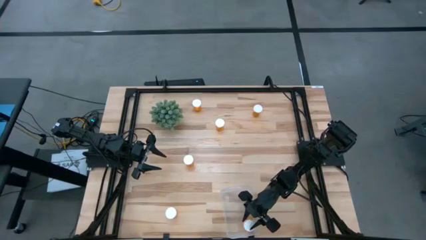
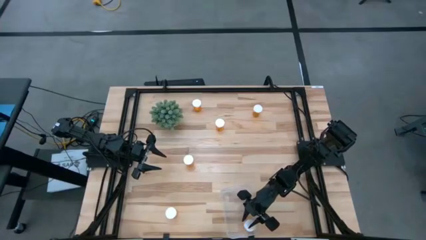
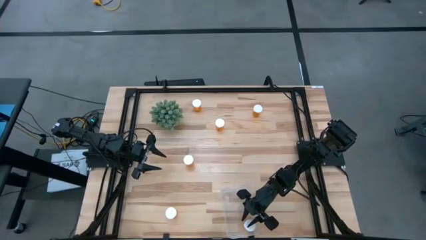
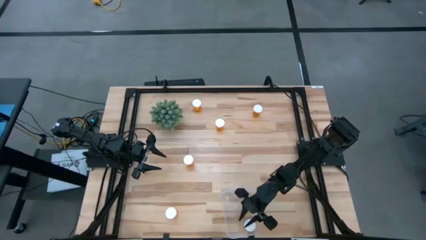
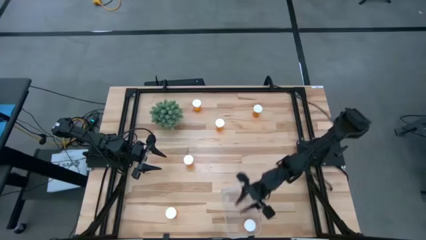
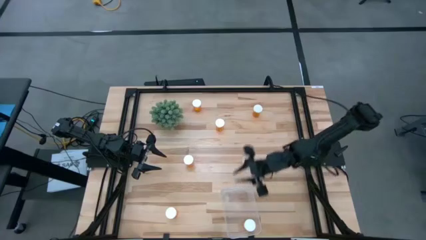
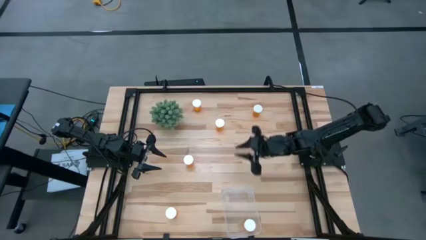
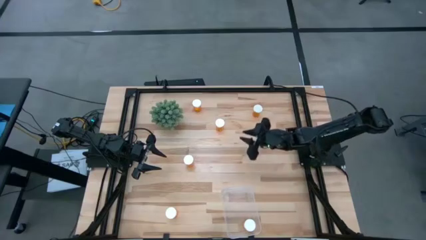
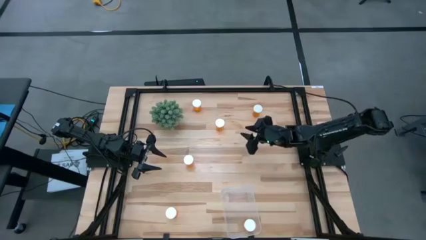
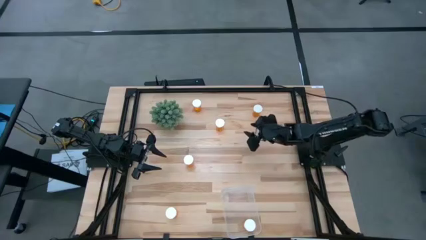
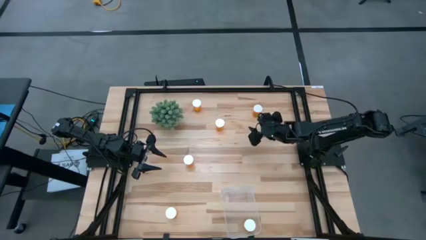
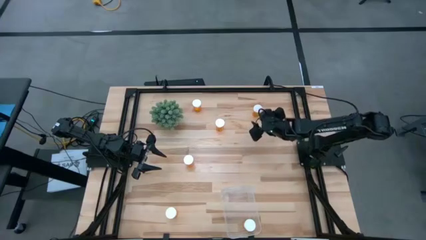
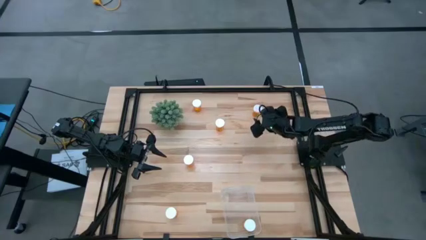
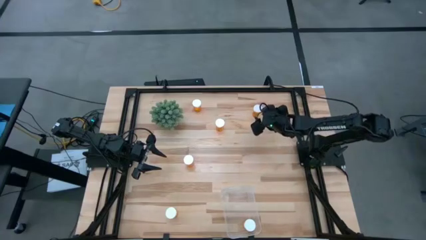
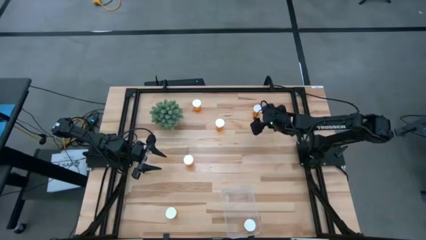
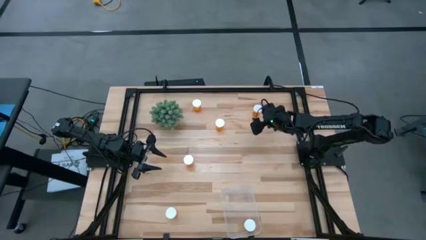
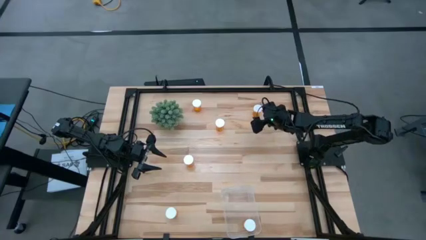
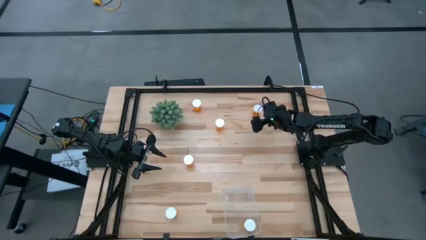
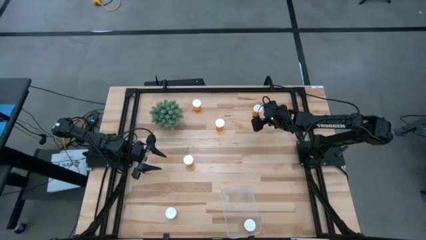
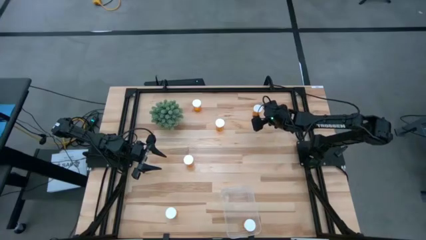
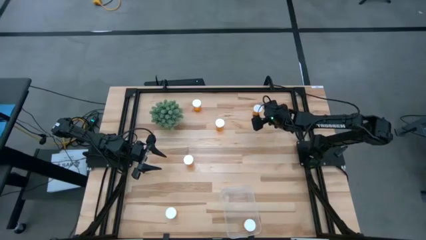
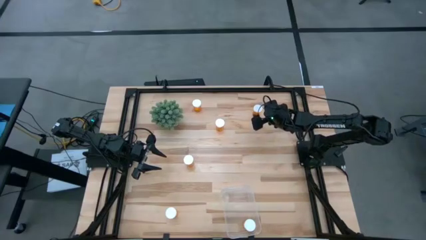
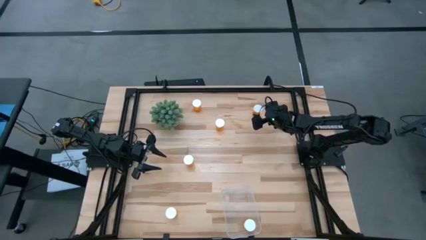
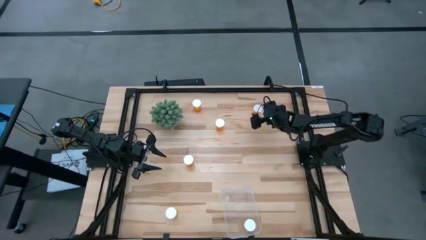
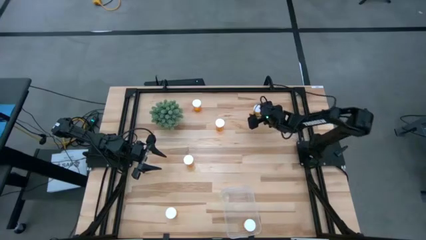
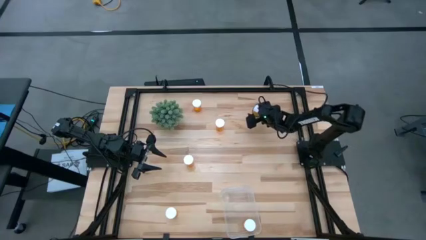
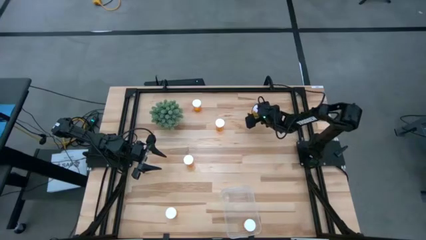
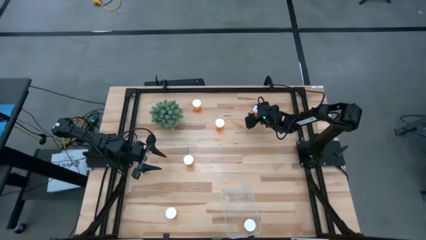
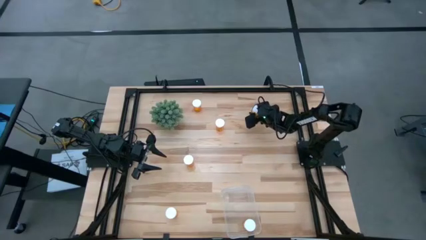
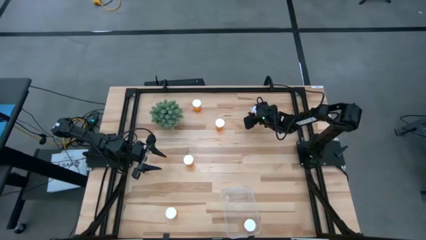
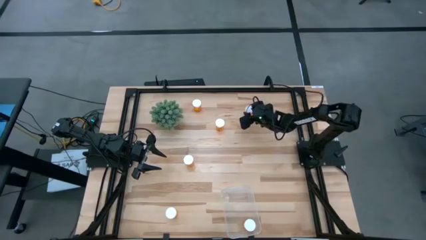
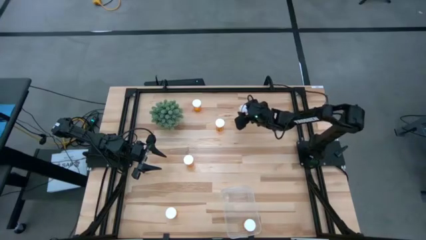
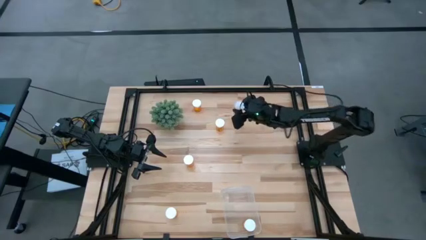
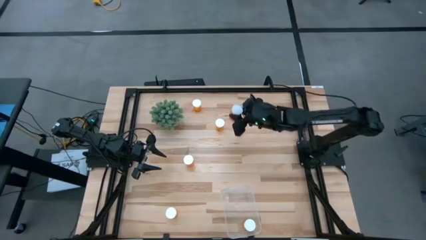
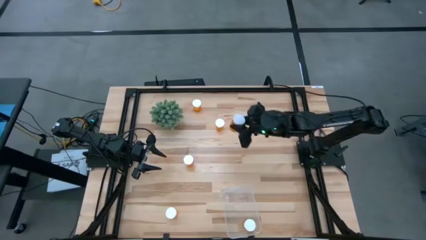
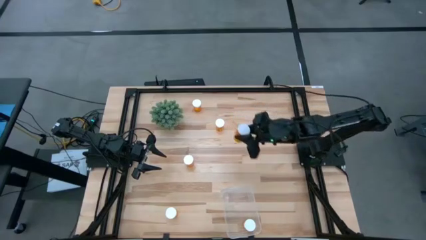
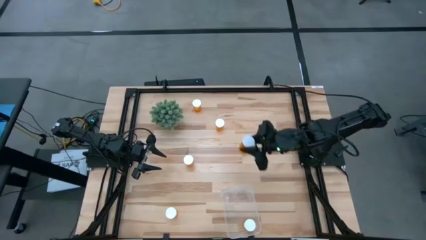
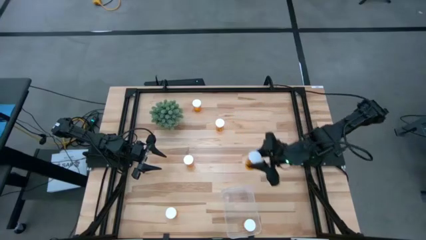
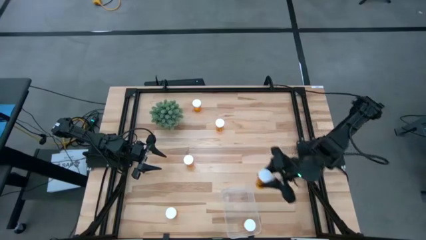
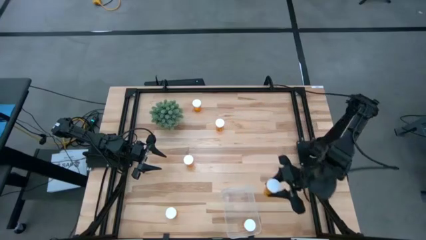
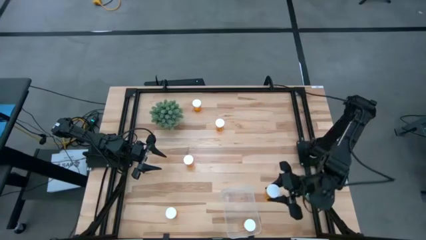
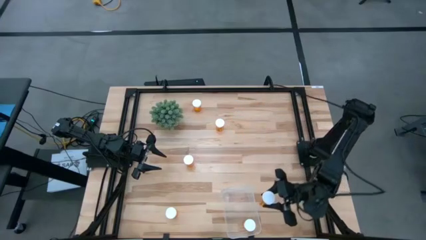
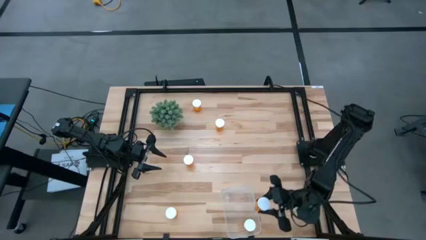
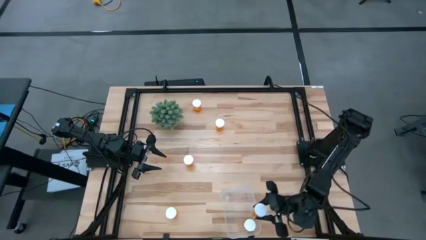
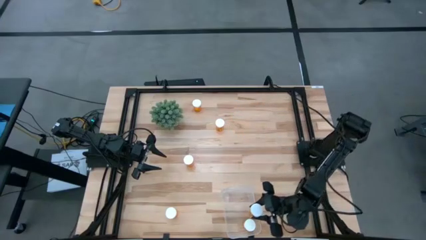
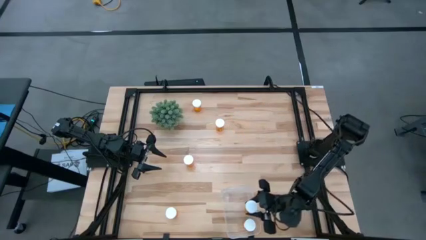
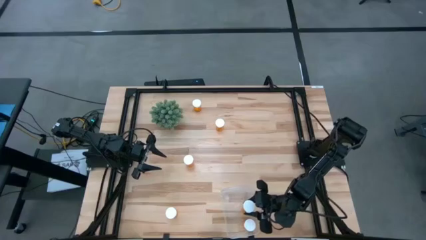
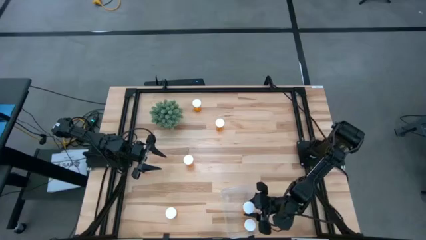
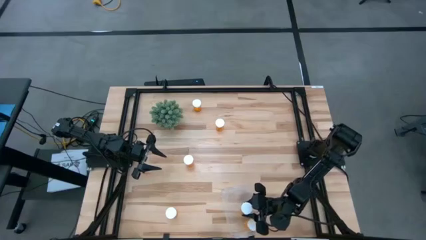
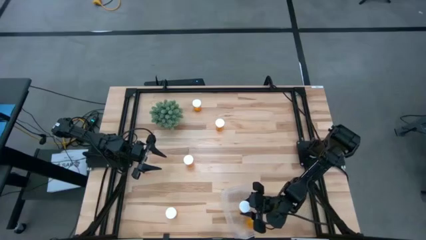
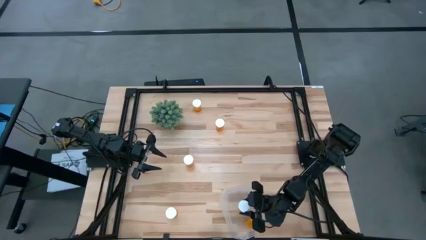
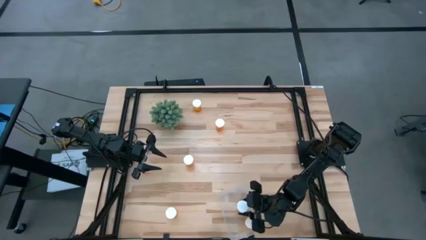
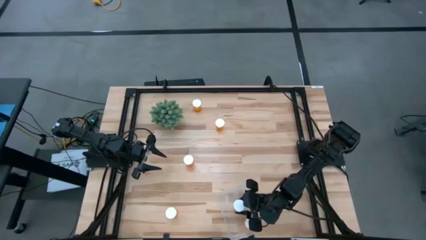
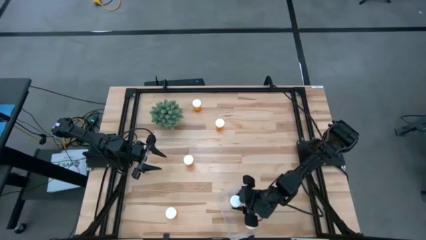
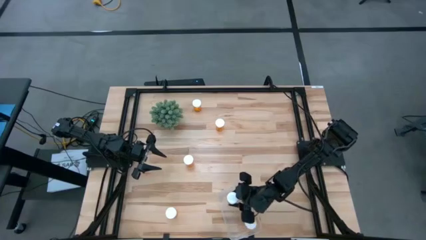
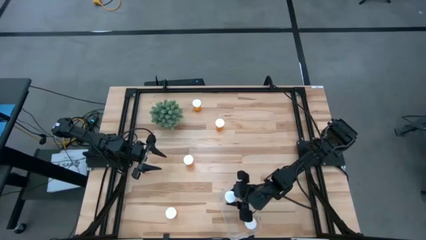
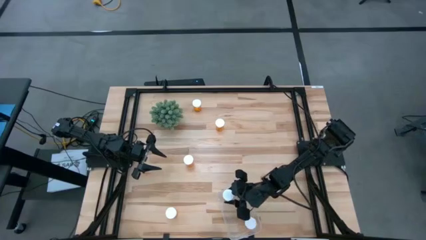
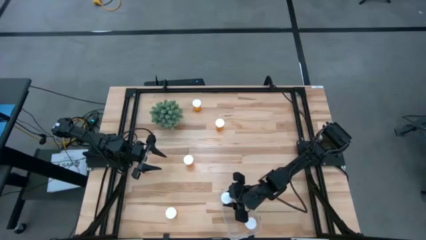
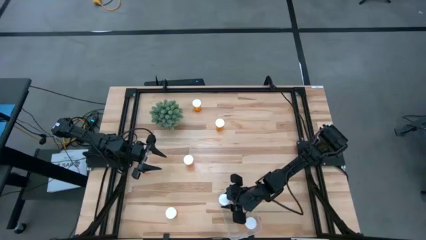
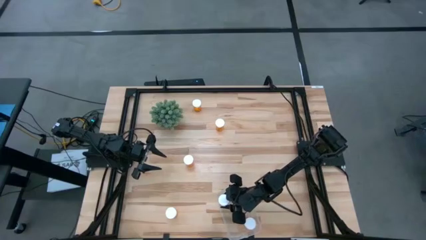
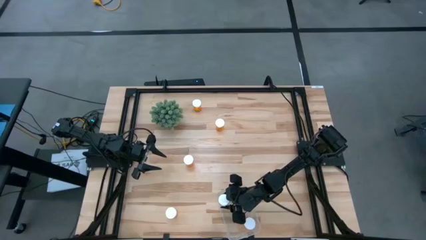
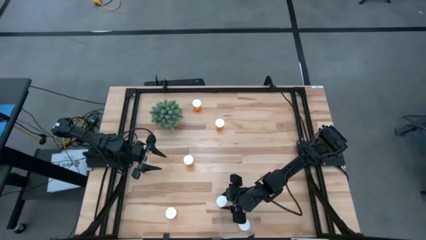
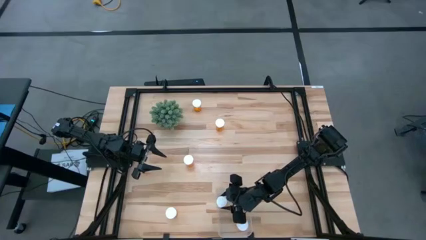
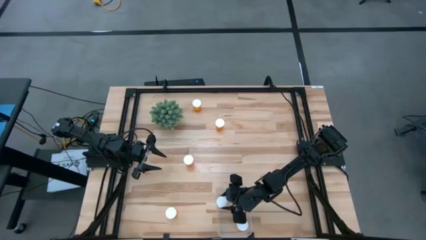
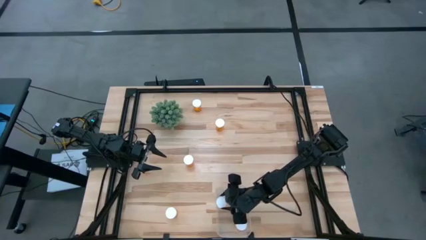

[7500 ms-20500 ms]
Task: Pick and place pill bottles into a basket
Put the orange pill bottle into the transparent bin

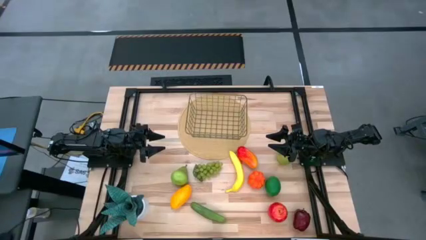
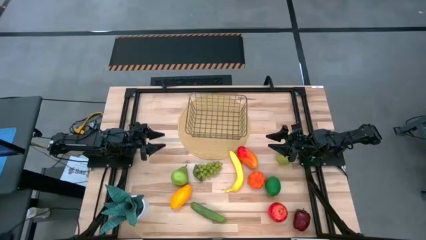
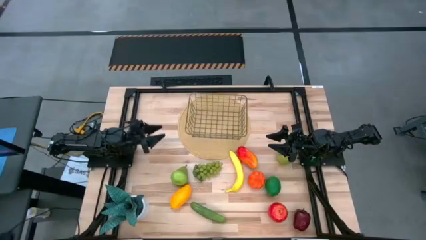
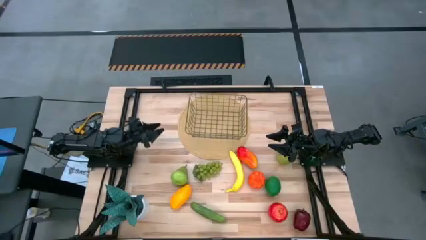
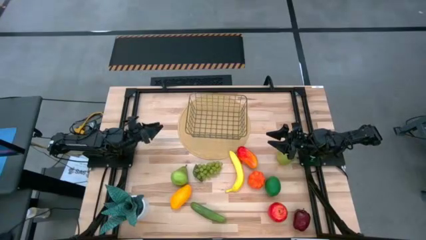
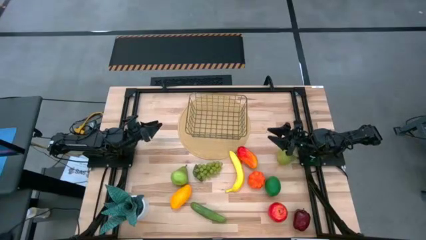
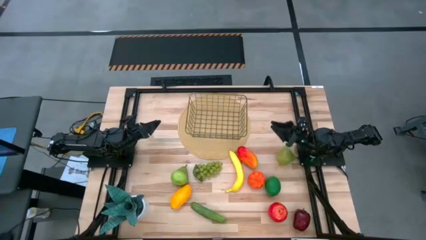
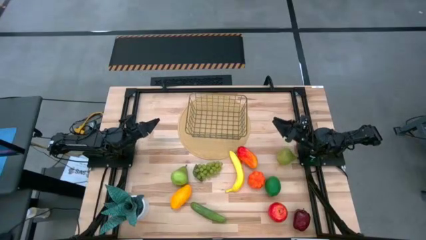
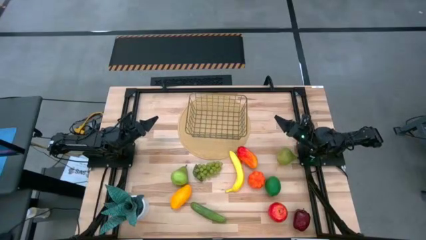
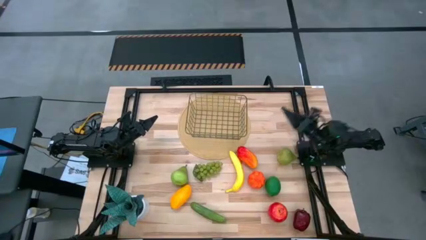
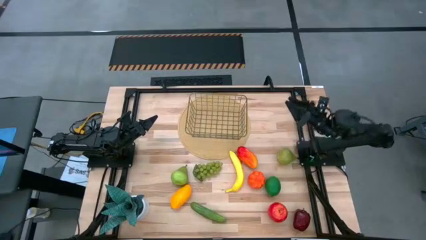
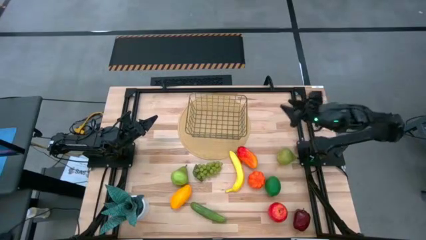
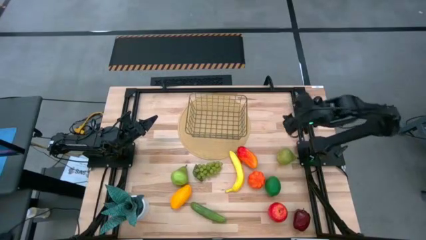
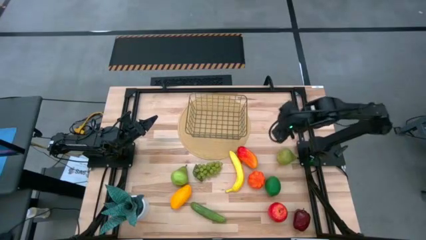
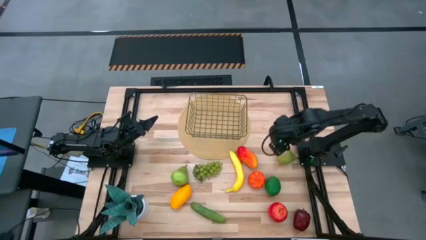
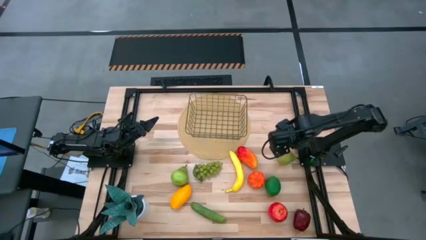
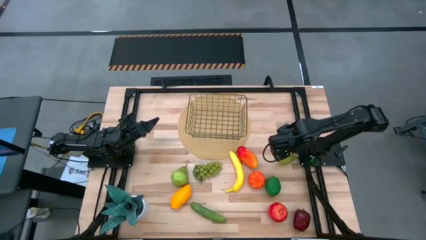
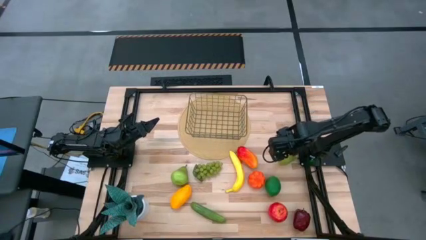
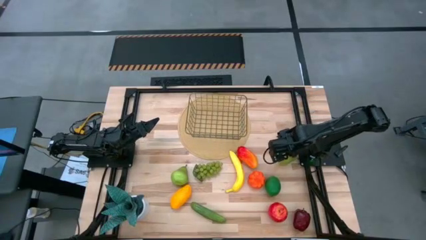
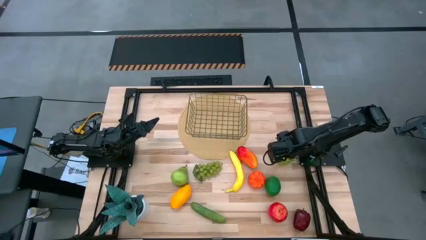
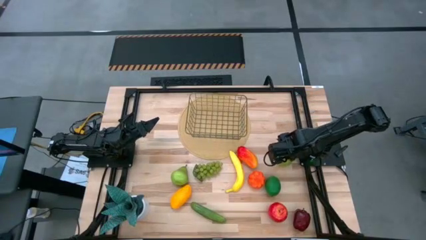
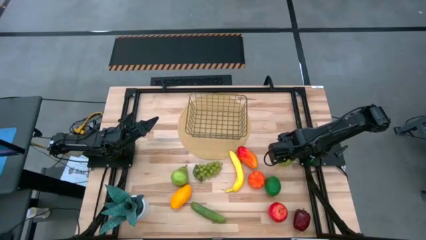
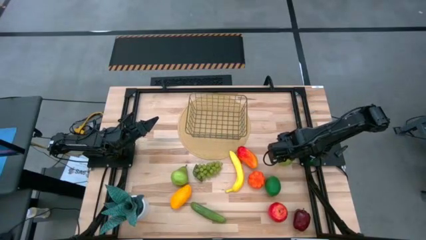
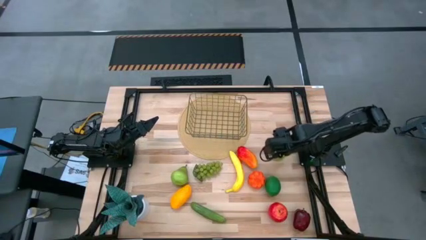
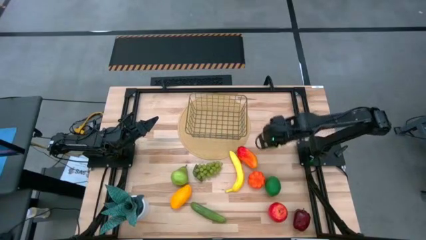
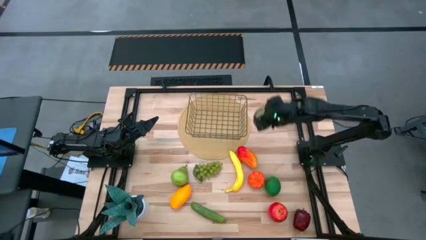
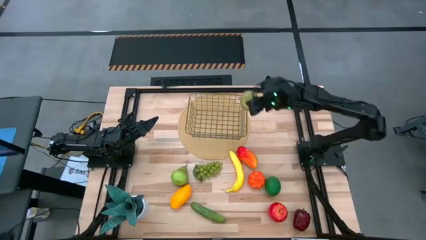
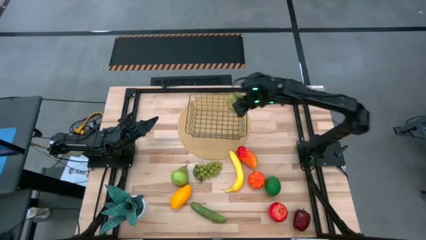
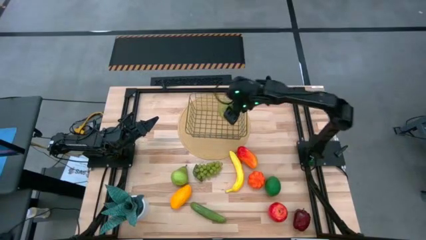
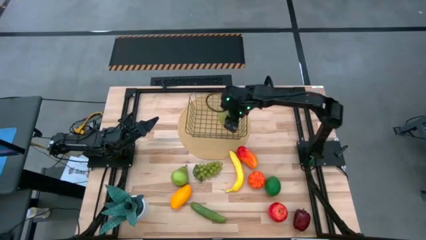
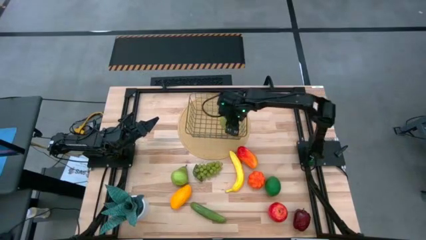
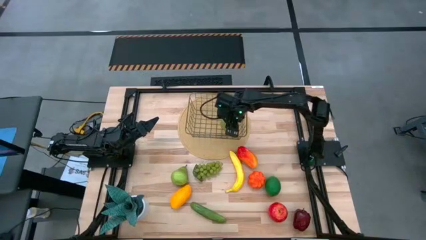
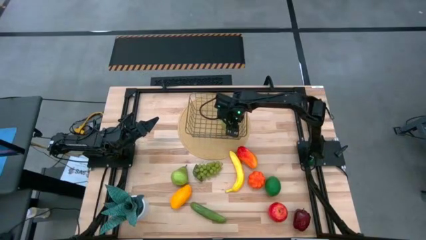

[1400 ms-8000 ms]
Task: Build produce basket
Put the right green pear into the wire basket
